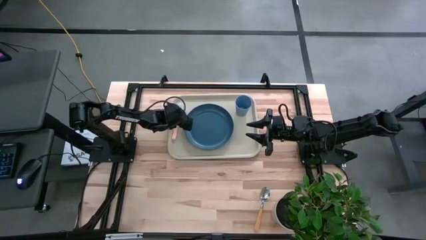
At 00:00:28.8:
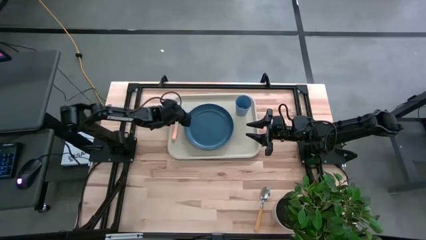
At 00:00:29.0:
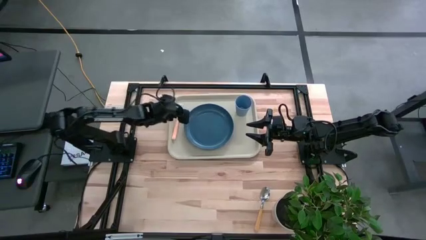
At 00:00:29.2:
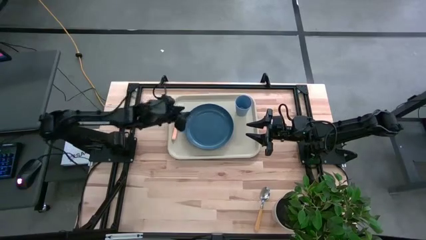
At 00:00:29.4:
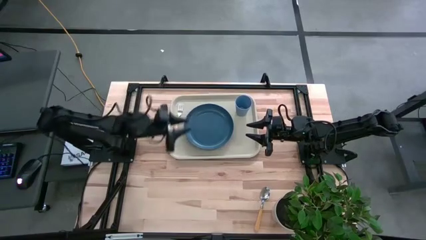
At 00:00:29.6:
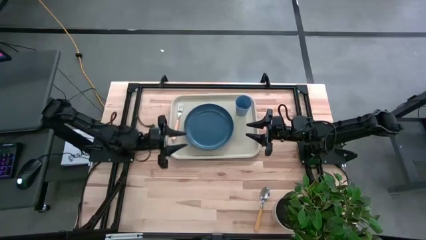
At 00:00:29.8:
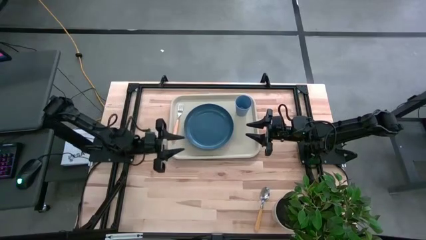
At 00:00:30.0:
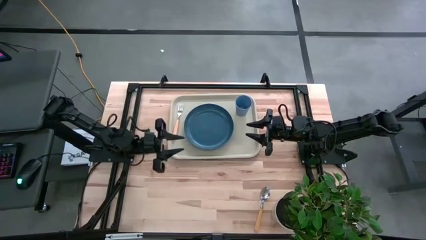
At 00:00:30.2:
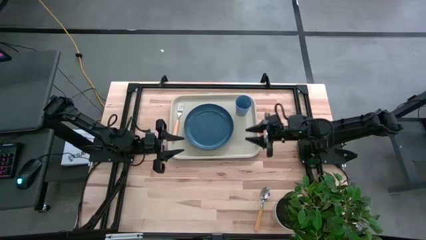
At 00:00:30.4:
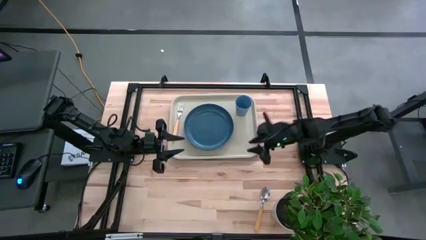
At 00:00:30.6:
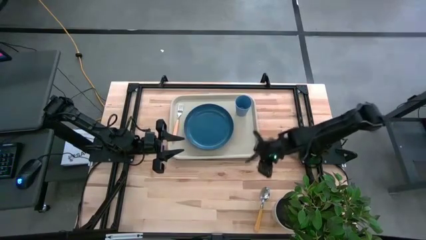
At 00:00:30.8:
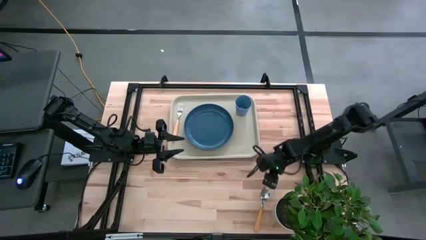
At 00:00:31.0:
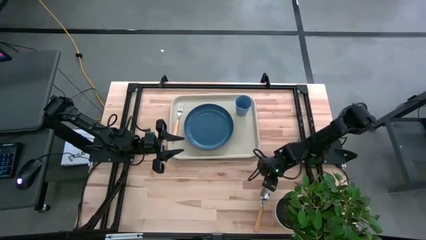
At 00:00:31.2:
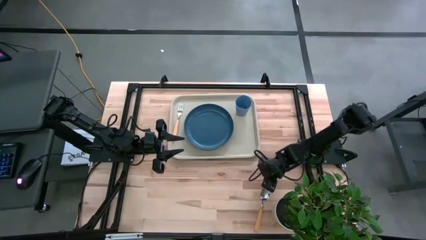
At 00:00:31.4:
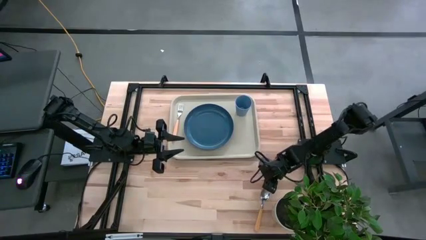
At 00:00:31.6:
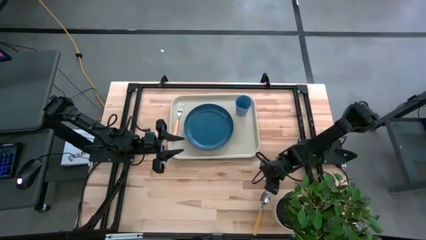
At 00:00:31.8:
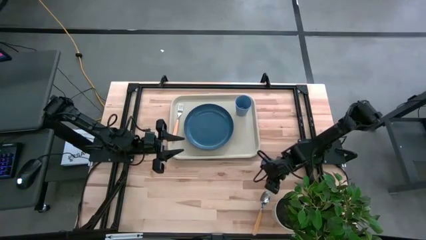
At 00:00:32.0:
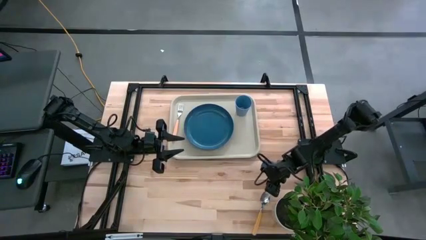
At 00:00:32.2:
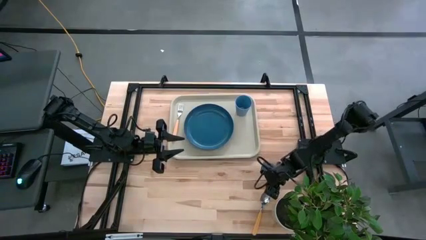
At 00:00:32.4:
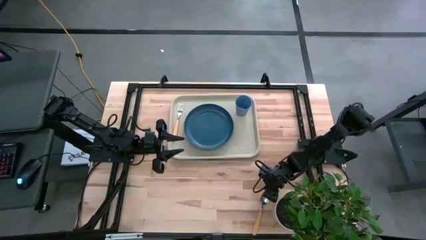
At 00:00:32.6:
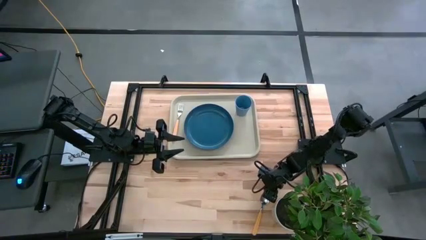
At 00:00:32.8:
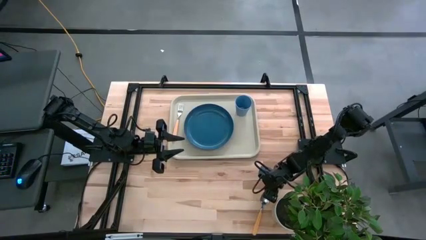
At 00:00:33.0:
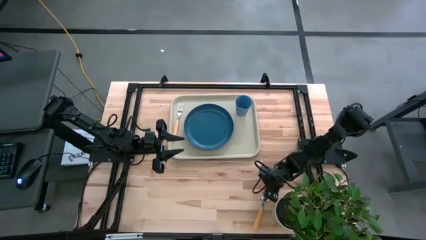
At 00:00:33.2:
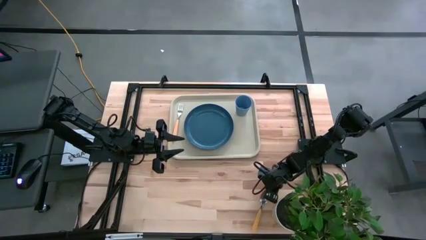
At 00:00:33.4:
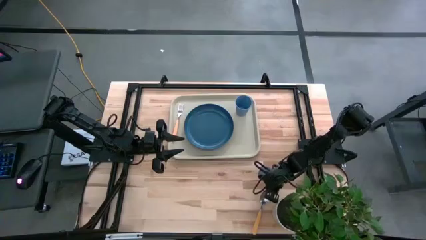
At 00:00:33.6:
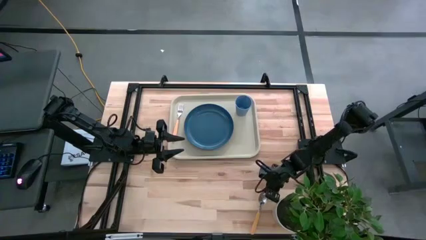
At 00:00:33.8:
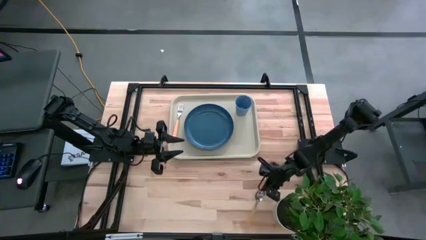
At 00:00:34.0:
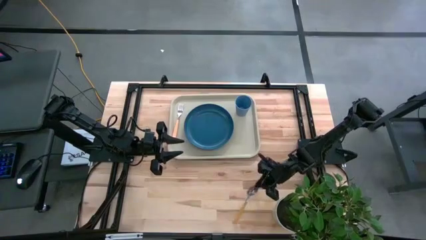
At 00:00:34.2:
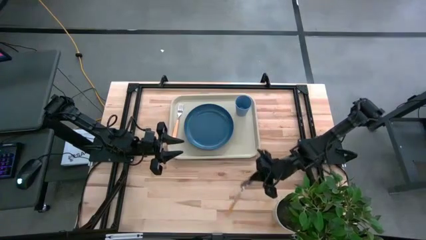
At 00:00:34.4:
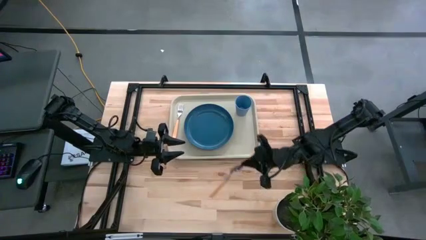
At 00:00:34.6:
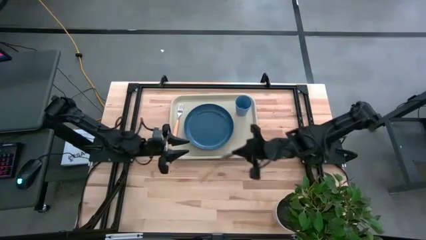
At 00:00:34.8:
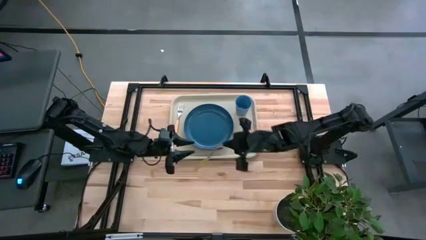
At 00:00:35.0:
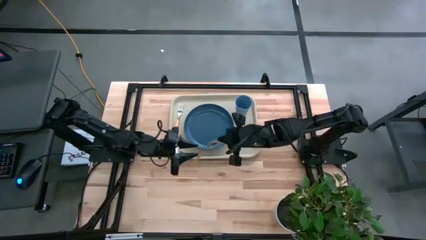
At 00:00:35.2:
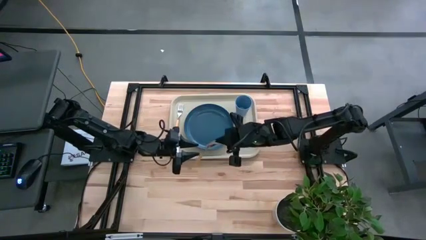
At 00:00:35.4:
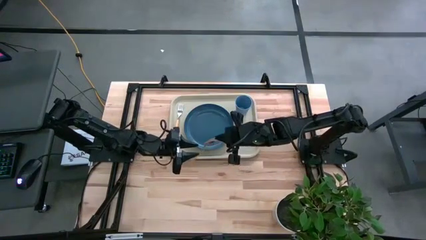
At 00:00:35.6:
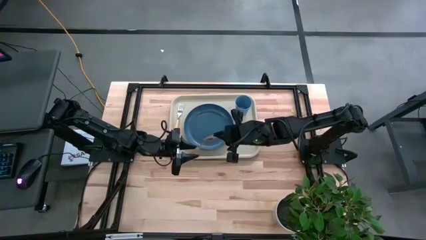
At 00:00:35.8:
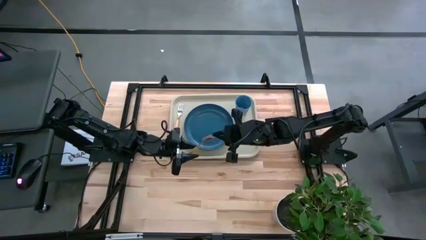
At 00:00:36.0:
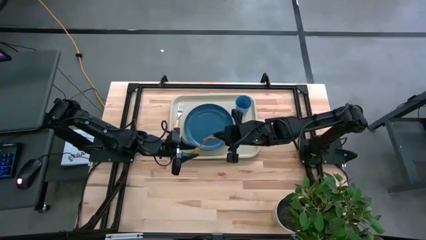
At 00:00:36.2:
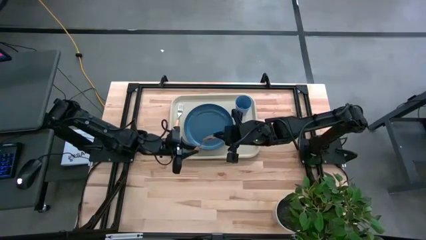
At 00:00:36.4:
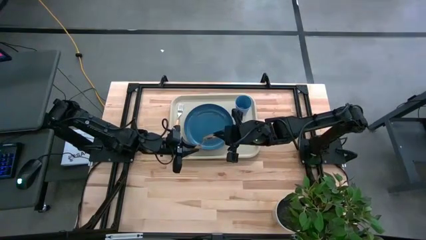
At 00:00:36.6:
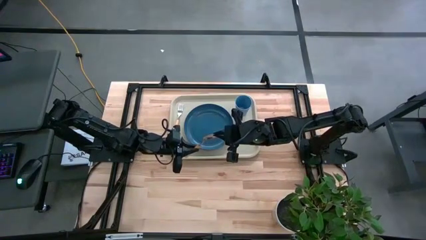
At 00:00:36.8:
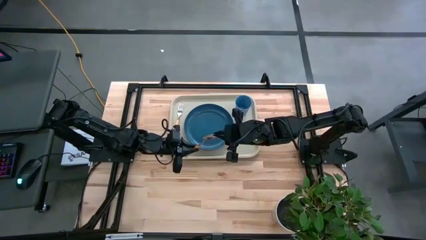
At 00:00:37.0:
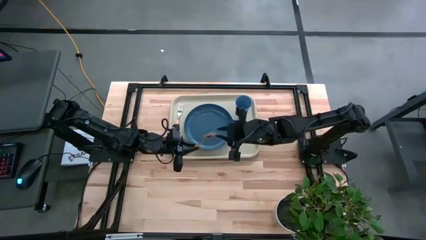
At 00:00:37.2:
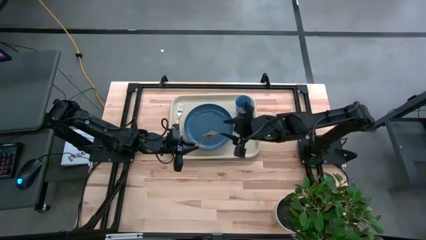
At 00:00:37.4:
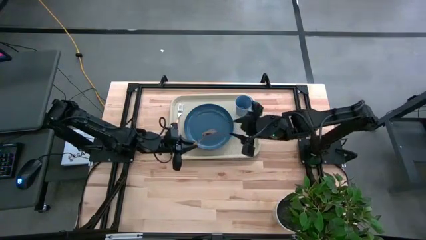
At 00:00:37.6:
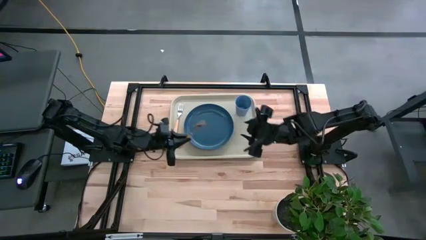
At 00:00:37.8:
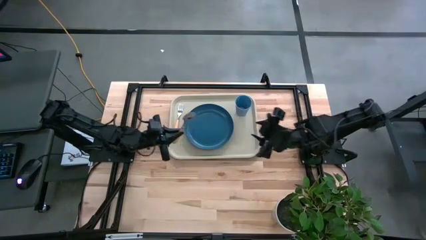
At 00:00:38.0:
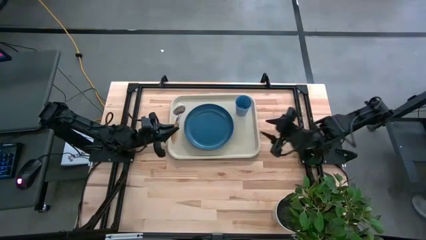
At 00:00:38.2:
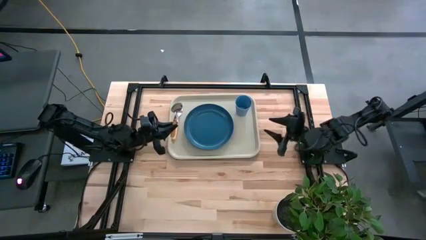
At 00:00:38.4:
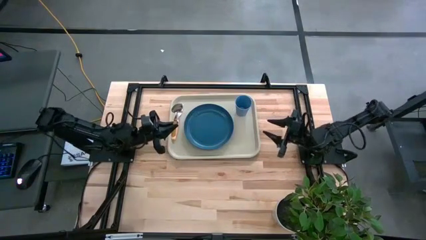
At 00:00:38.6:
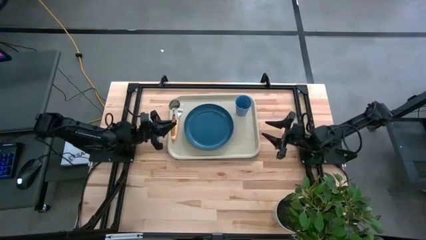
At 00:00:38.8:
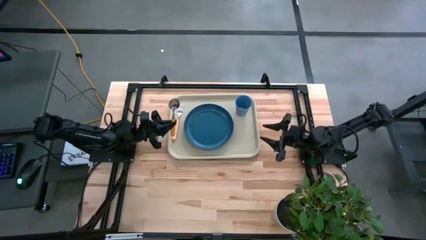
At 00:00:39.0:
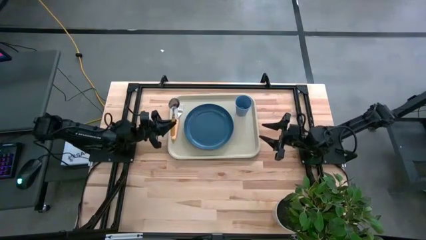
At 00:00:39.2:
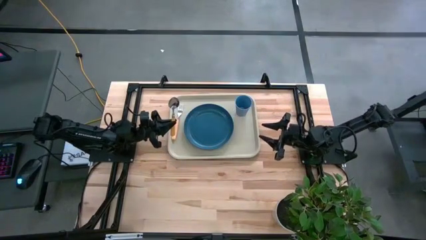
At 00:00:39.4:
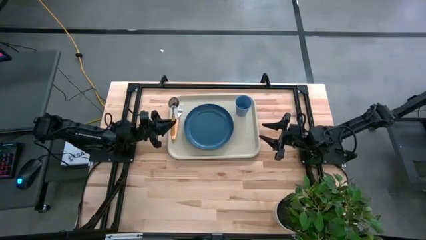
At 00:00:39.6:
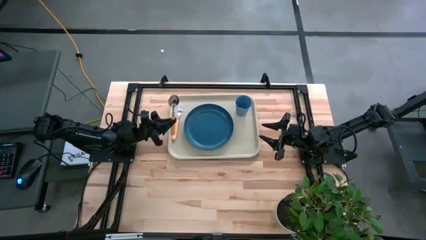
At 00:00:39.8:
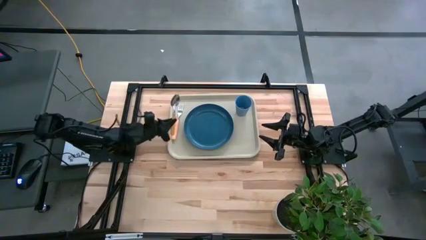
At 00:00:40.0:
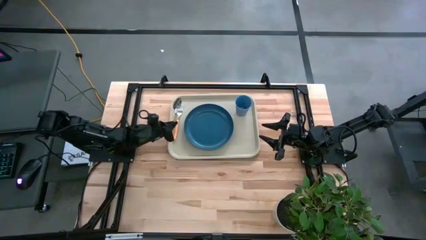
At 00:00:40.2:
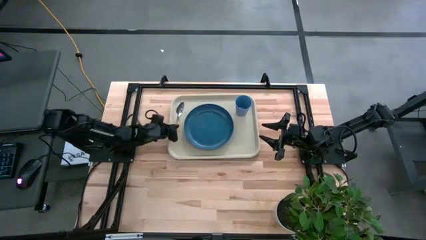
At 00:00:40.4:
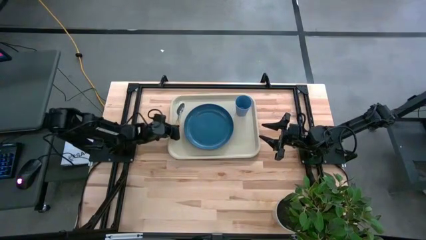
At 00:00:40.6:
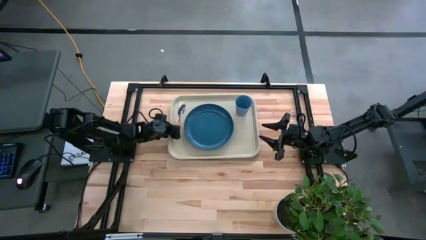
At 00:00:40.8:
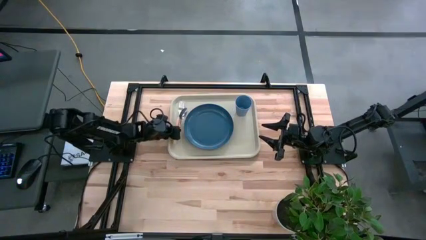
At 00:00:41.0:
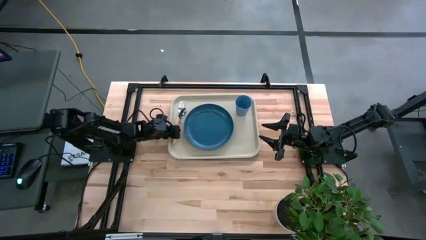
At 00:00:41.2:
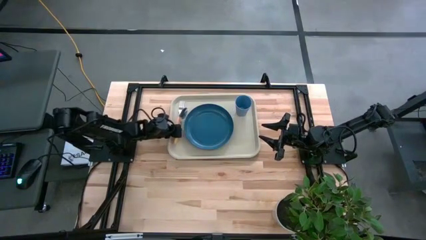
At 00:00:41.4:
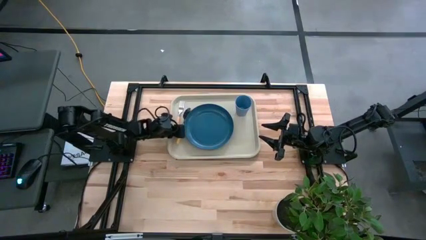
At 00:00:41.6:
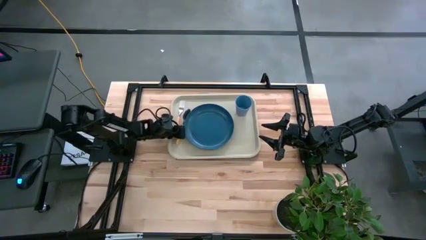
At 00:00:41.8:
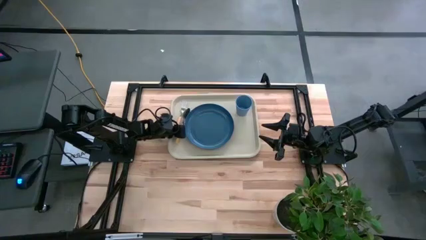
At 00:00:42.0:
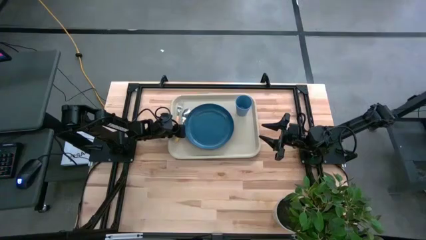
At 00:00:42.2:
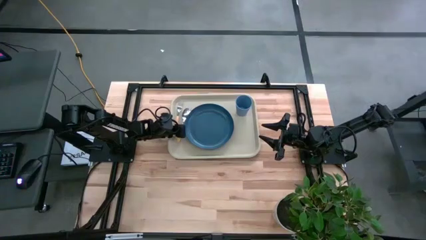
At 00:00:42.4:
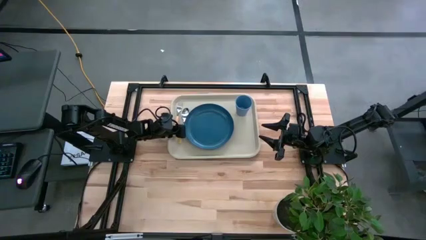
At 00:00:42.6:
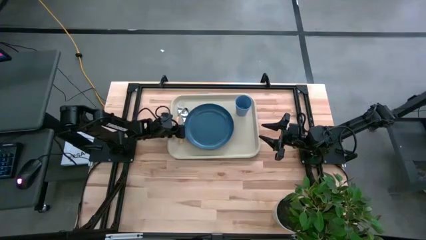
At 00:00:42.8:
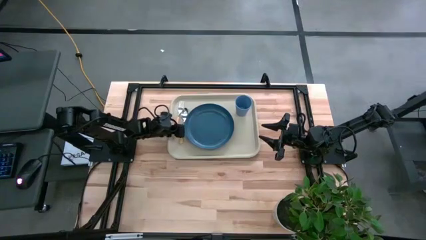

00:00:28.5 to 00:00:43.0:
Task: Pick and place plate/cup/fork/spoon on tray
Put the yellow spoon on the white tray at the left of the blue plate
